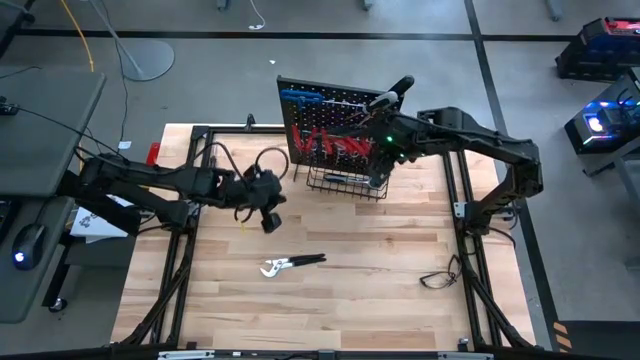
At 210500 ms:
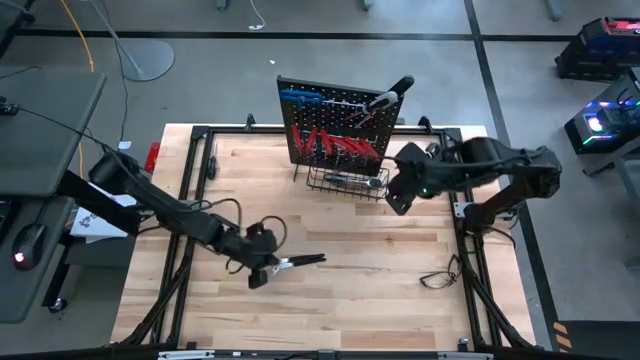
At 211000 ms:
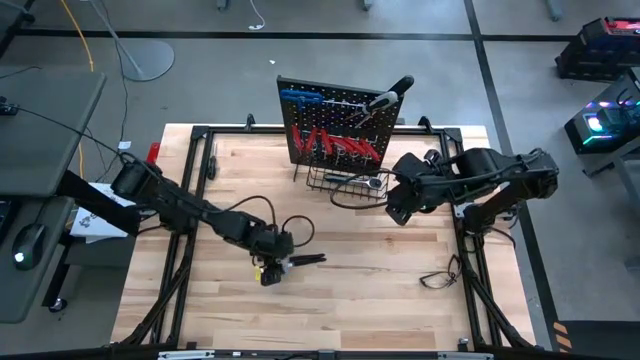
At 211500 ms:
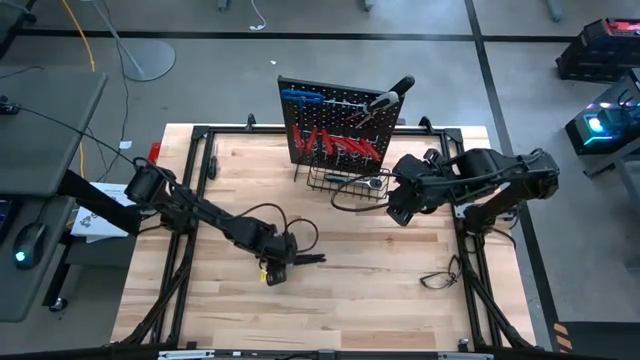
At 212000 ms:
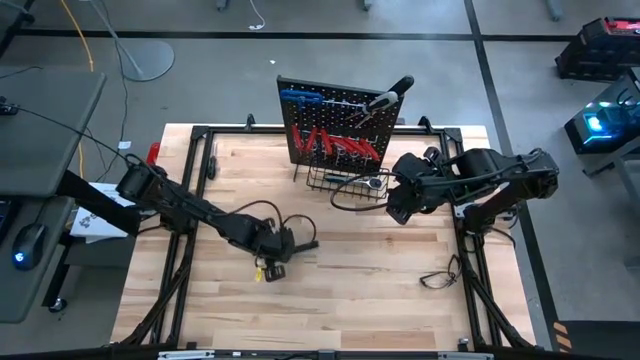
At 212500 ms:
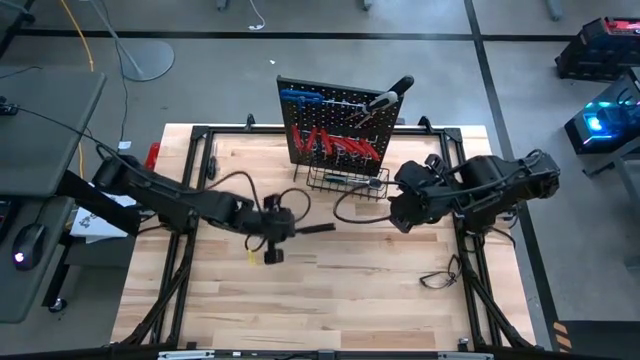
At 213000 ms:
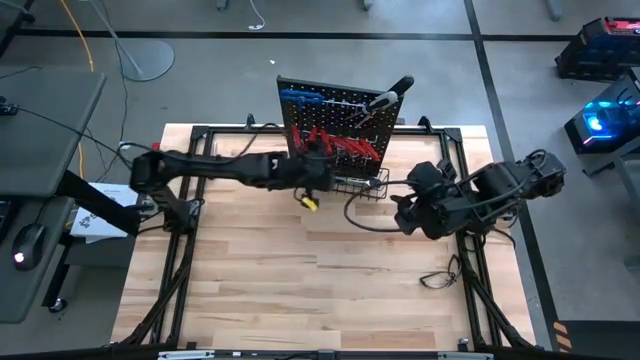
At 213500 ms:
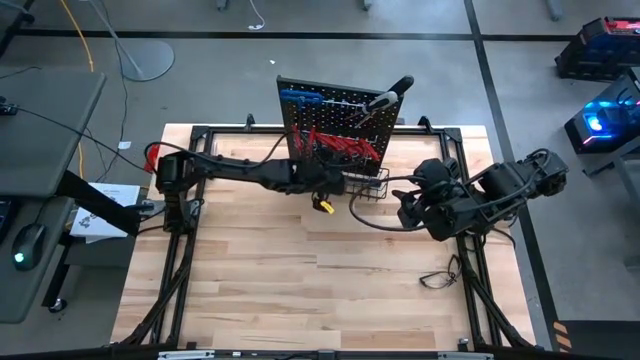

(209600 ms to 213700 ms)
Task: Hang tools onto peg board
Put the black adjustable pliers into the wire basket on the peg board

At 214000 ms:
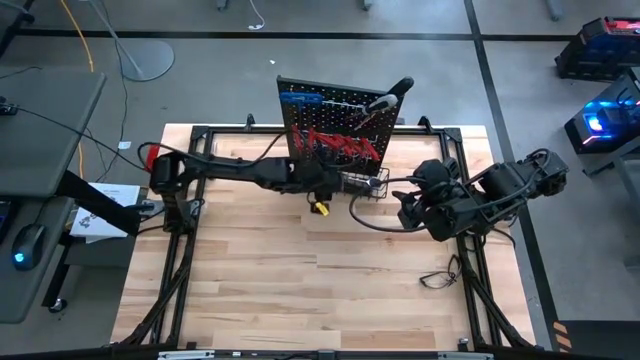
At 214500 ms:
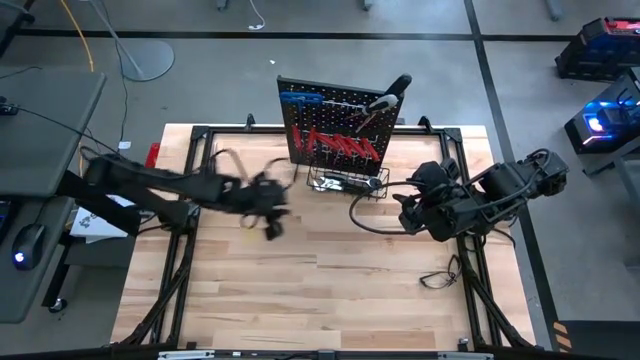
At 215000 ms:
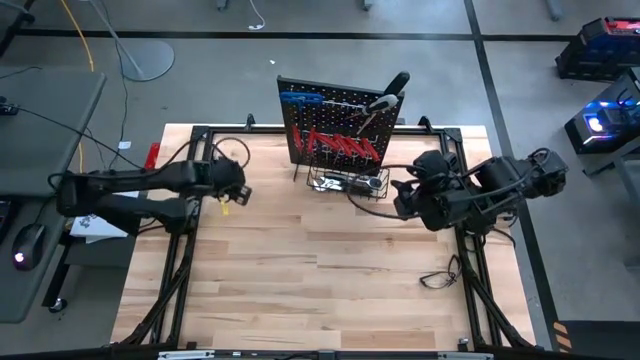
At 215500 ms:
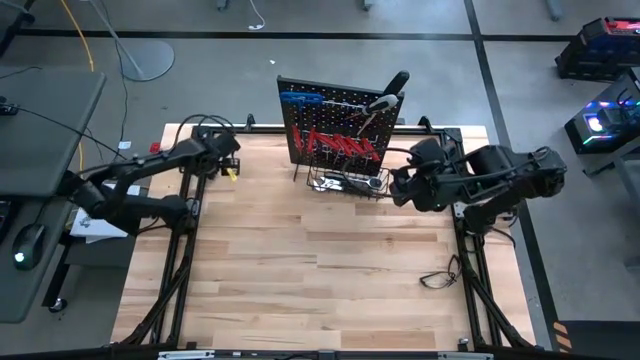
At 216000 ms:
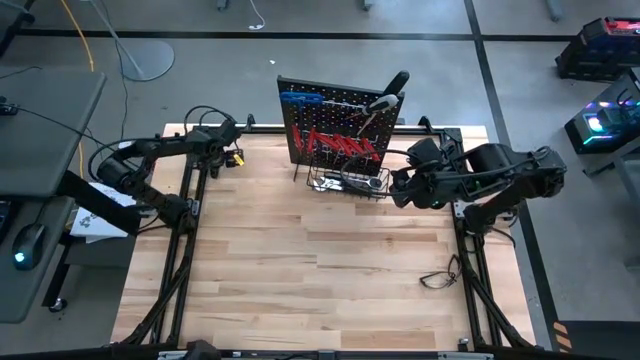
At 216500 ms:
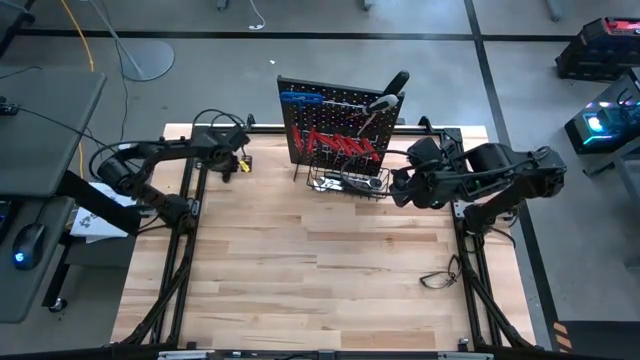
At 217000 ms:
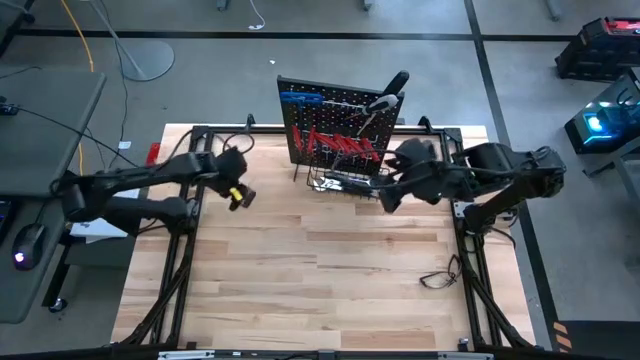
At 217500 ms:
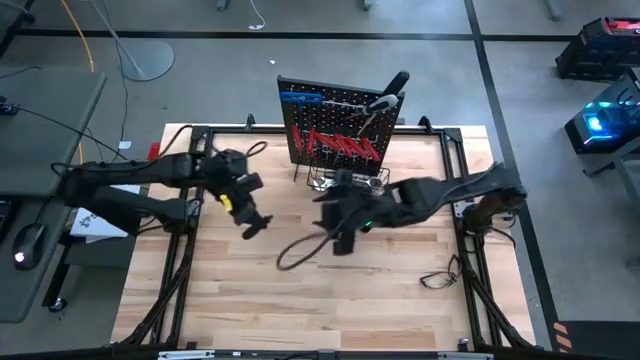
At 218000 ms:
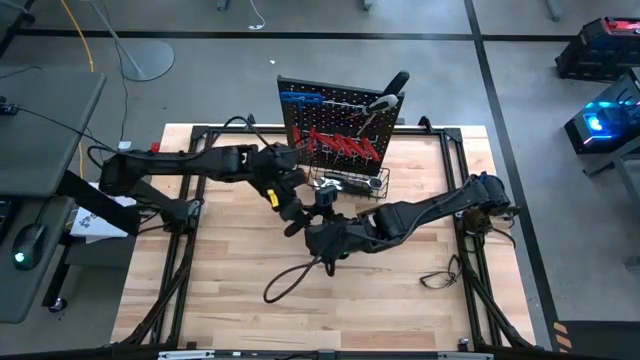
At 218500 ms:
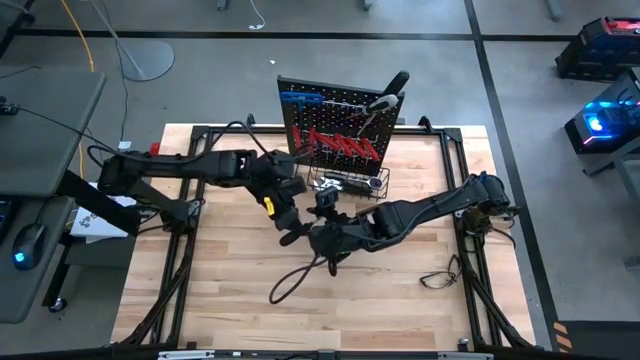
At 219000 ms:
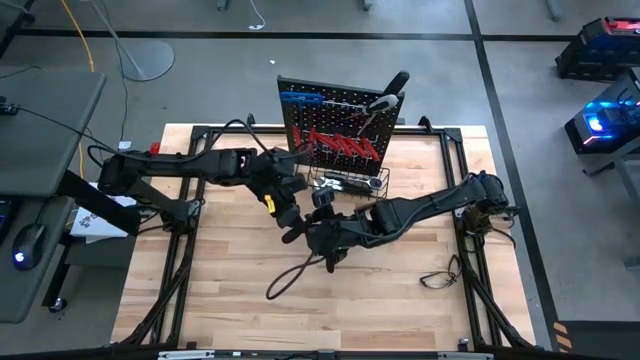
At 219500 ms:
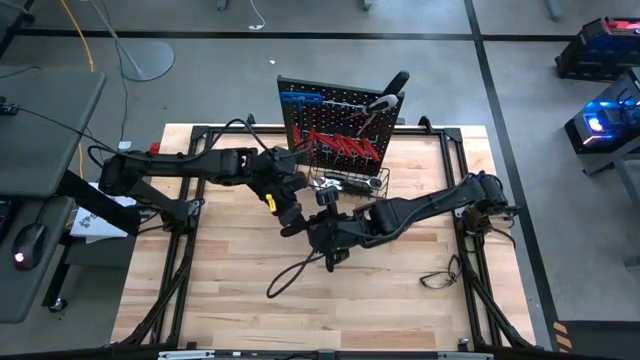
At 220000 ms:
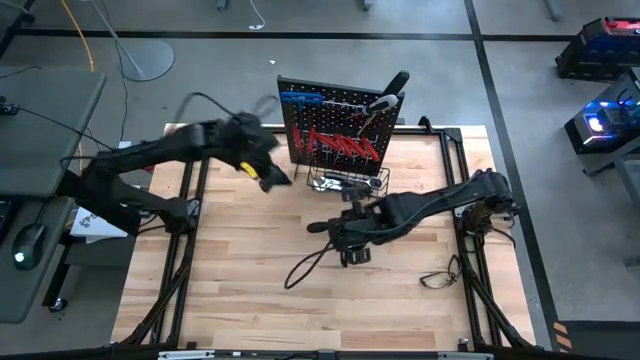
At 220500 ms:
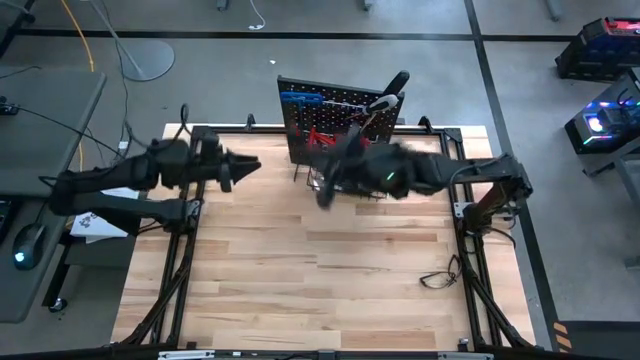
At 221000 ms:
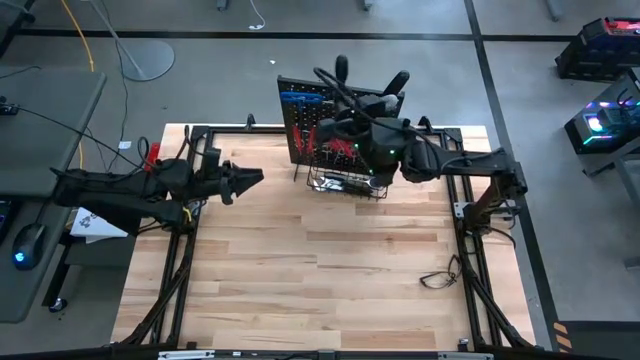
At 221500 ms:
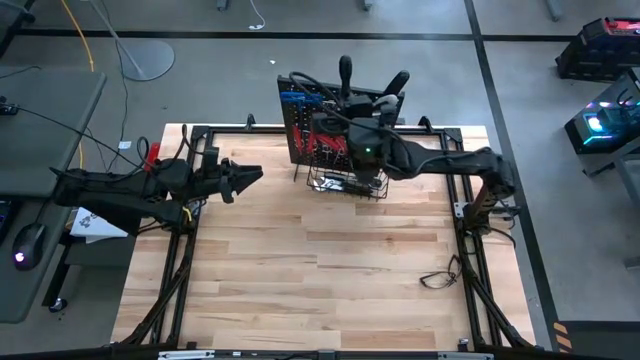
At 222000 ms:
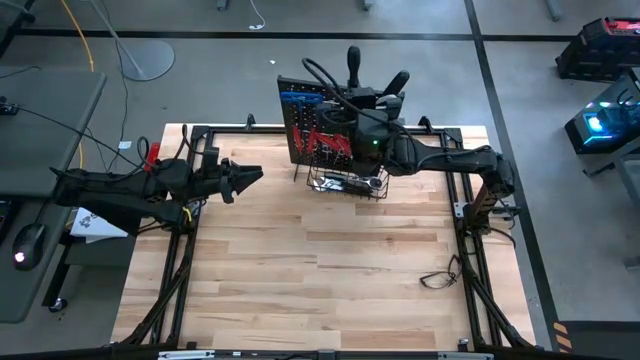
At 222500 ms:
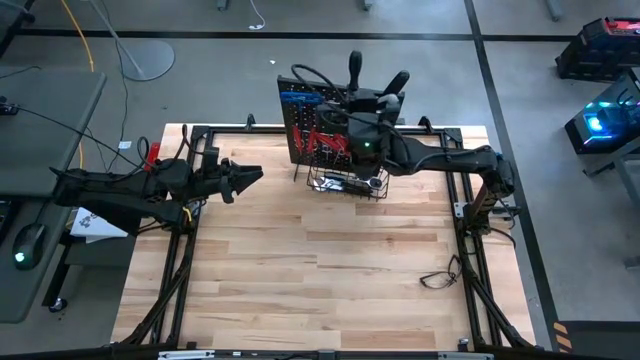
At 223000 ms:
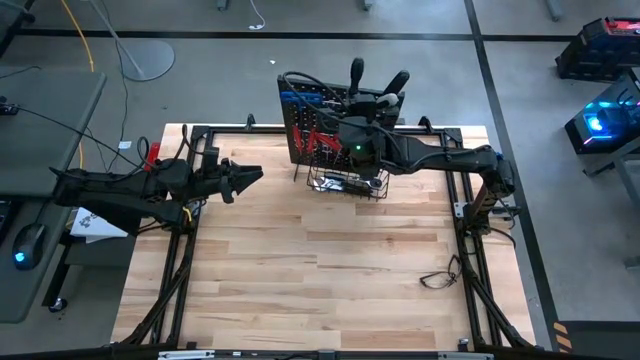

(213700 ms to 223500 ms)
Hang the black screwdriver on the peg board

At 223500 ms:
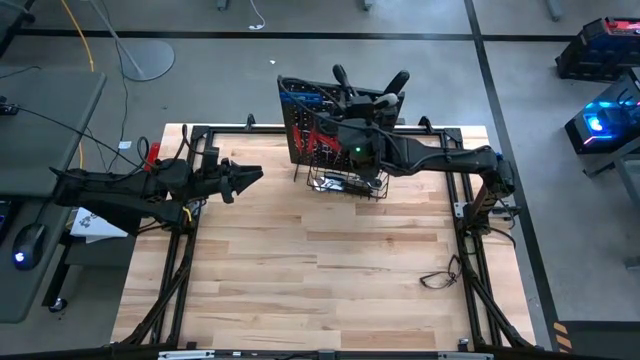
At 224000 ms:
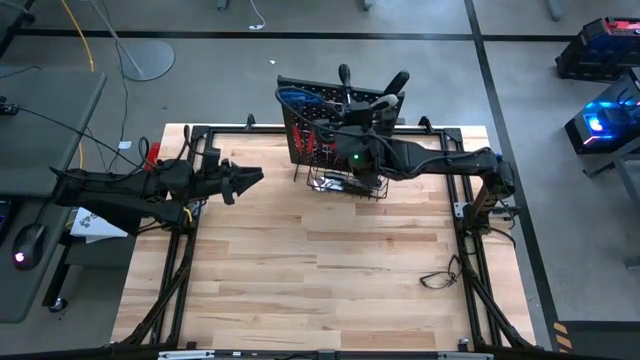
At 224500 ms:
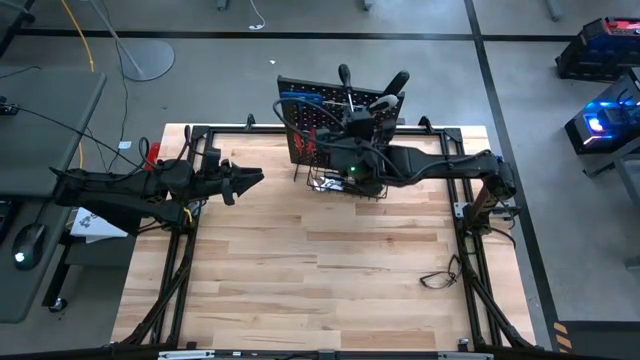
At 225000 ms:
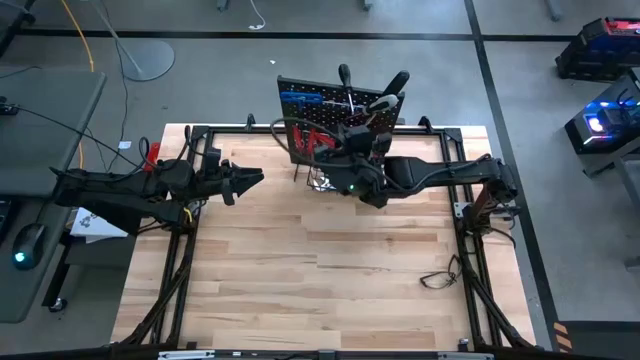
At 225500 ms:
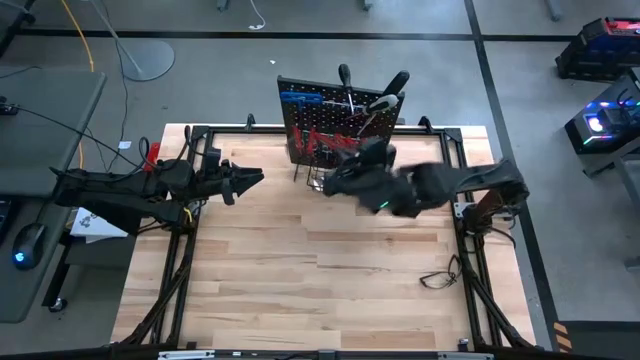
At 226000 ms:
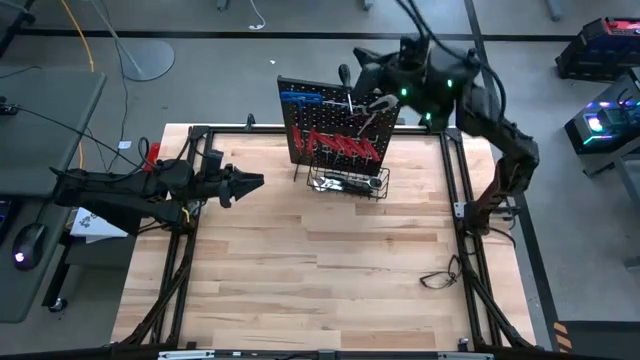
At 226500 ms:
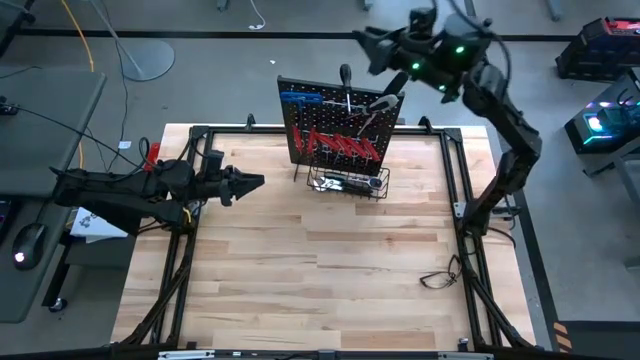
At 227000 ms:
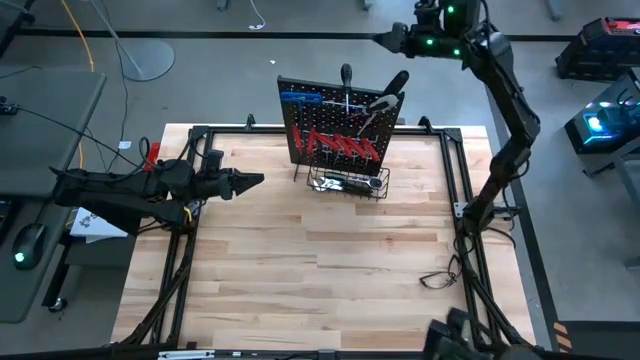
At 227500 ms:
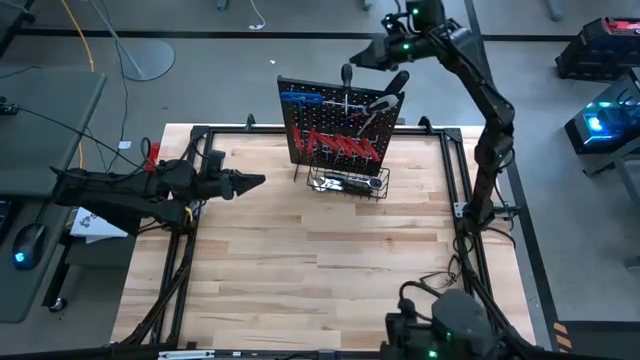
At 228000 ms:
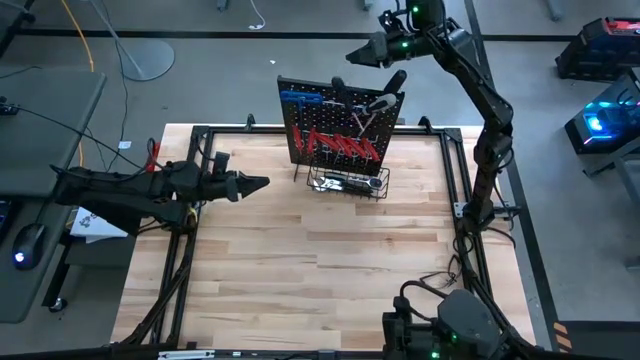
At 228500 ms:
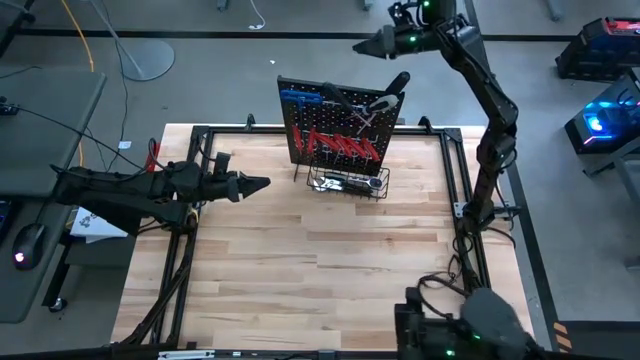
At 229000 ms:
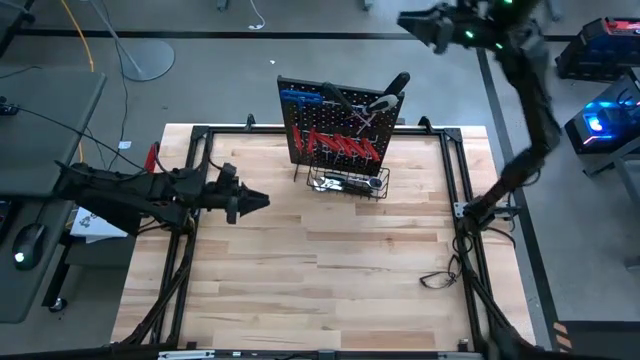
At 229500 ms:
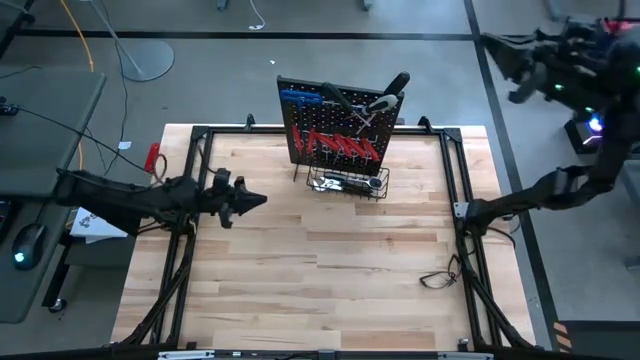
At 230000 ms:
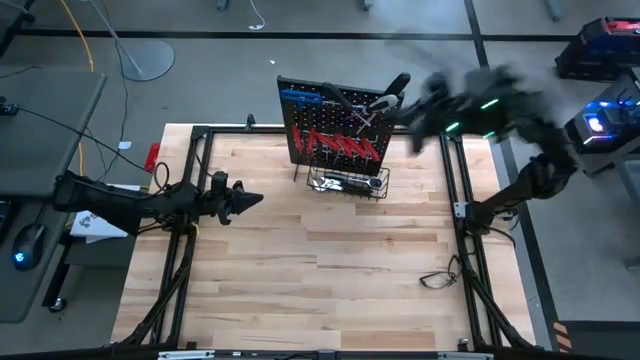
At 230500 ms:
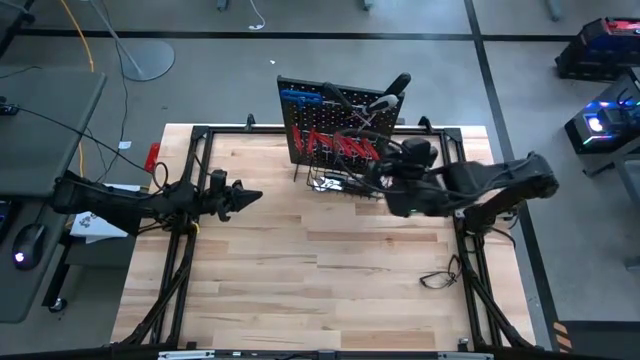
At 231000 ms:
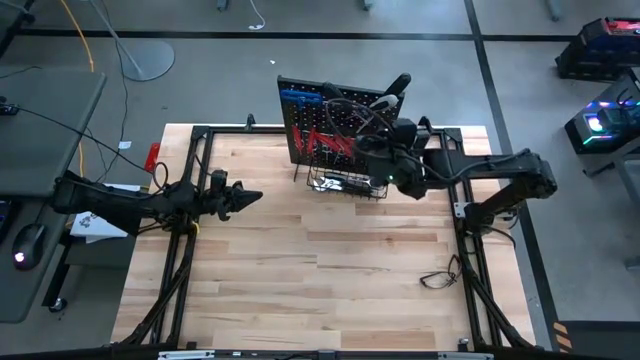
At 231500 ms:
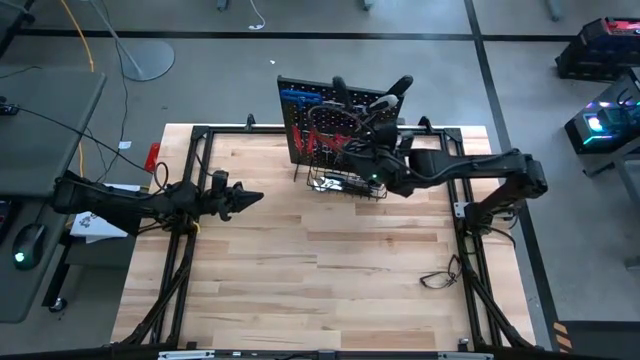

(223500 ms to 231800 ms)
Hang the black screwdriver on the peg board
